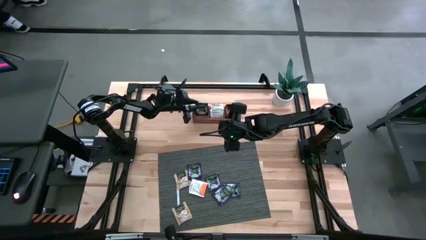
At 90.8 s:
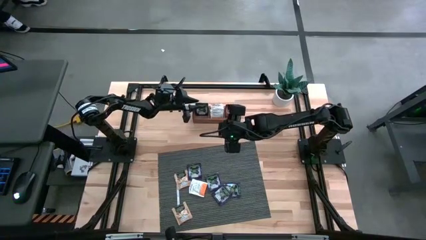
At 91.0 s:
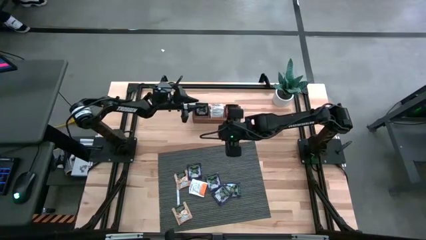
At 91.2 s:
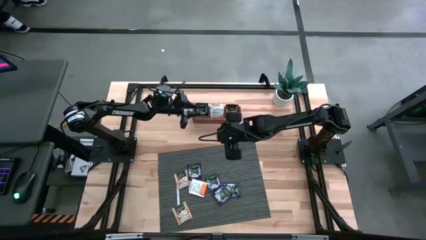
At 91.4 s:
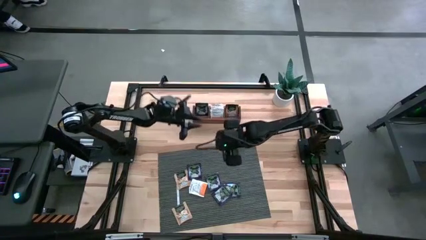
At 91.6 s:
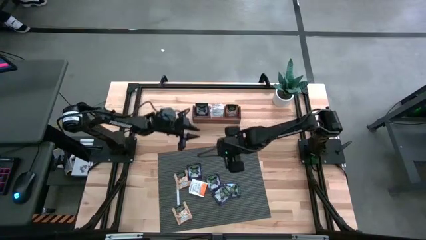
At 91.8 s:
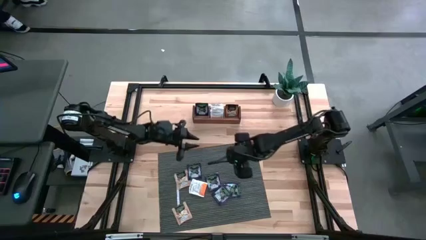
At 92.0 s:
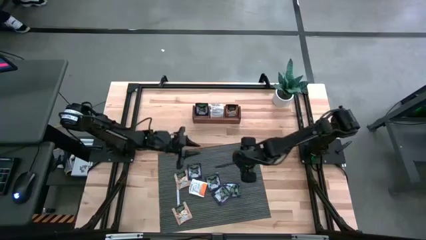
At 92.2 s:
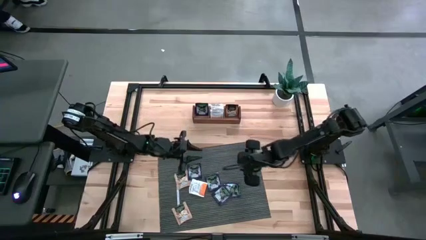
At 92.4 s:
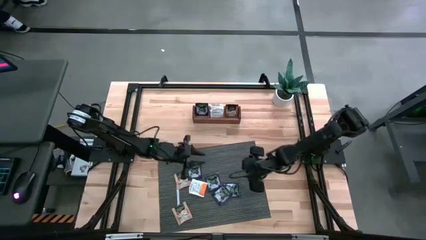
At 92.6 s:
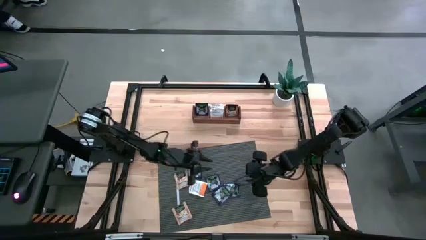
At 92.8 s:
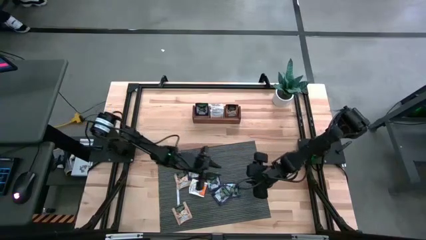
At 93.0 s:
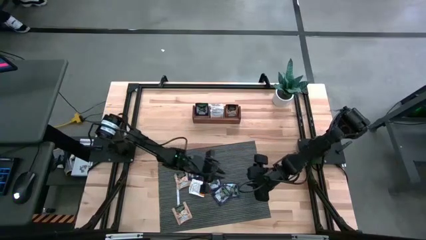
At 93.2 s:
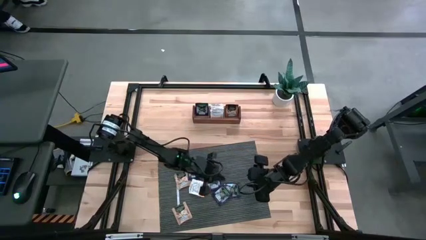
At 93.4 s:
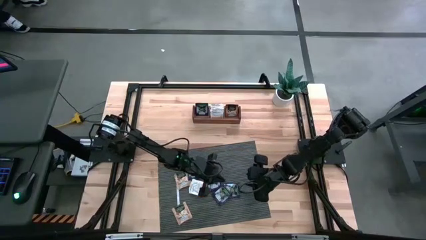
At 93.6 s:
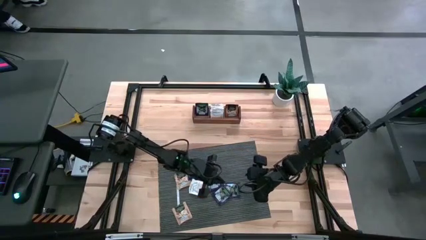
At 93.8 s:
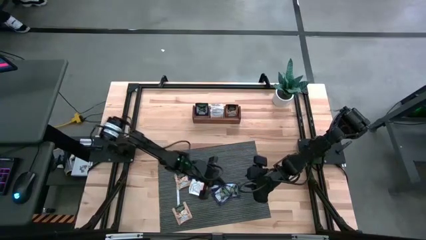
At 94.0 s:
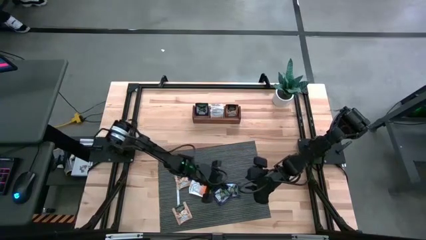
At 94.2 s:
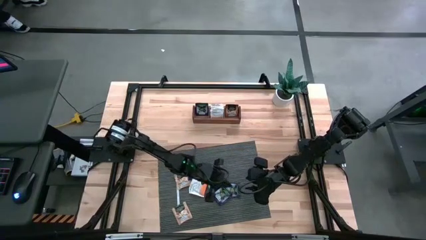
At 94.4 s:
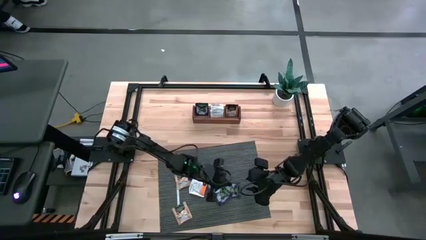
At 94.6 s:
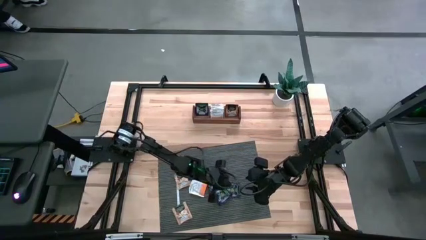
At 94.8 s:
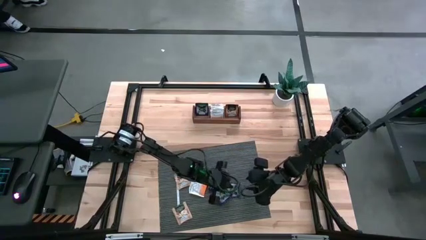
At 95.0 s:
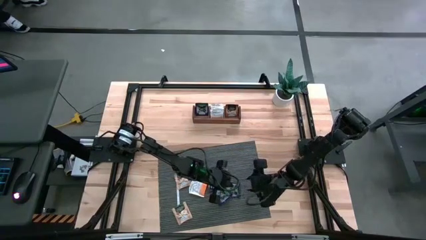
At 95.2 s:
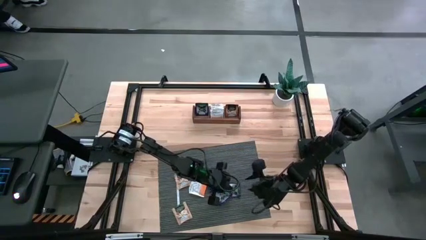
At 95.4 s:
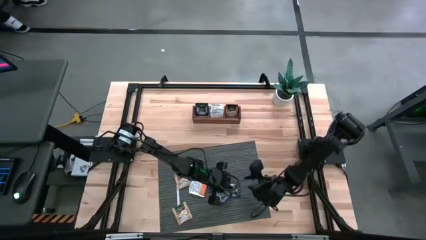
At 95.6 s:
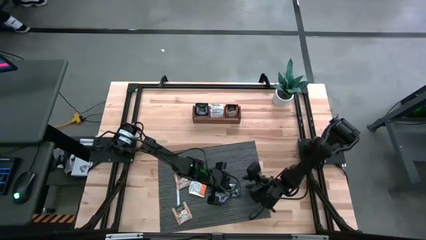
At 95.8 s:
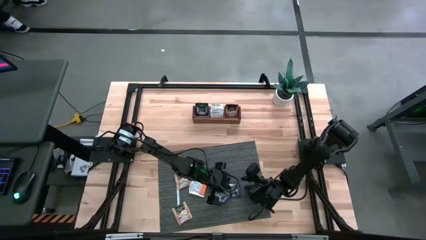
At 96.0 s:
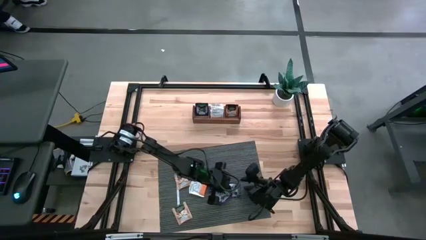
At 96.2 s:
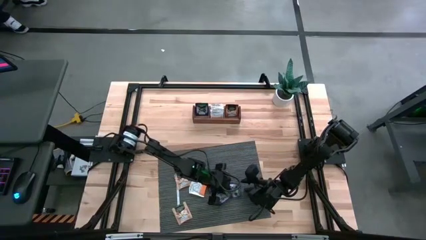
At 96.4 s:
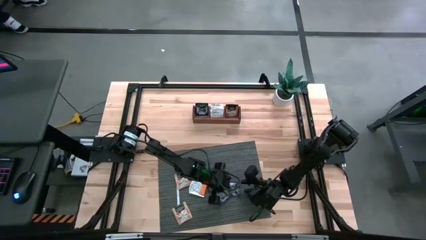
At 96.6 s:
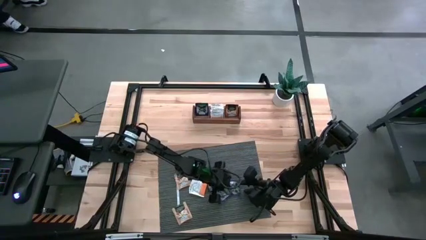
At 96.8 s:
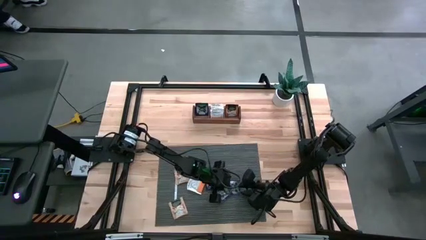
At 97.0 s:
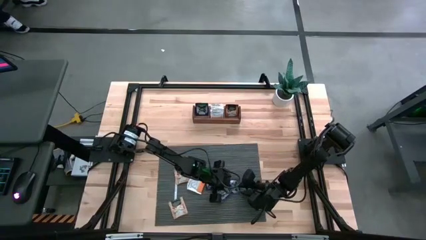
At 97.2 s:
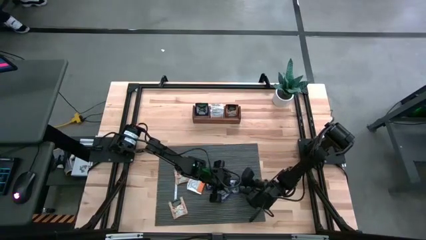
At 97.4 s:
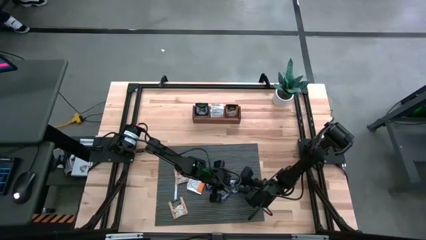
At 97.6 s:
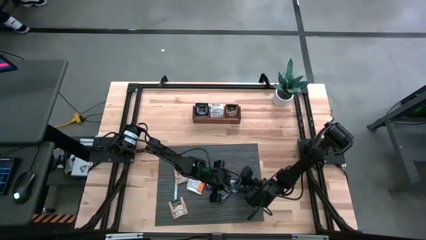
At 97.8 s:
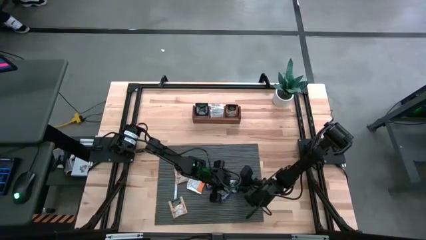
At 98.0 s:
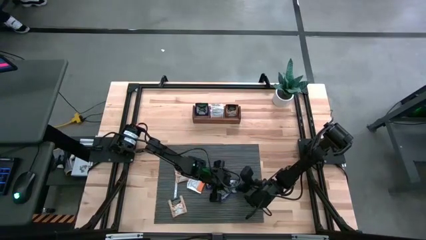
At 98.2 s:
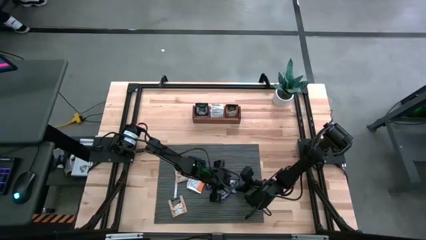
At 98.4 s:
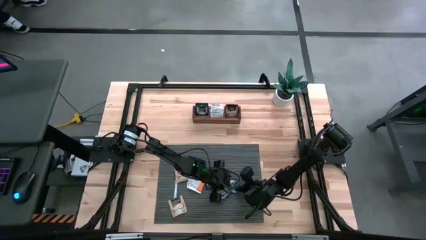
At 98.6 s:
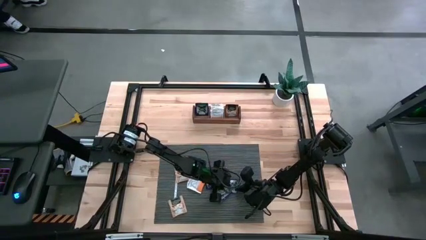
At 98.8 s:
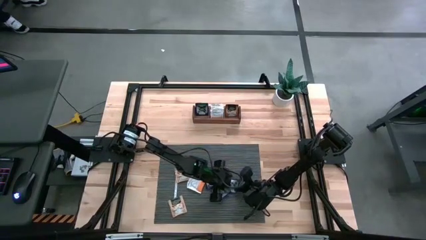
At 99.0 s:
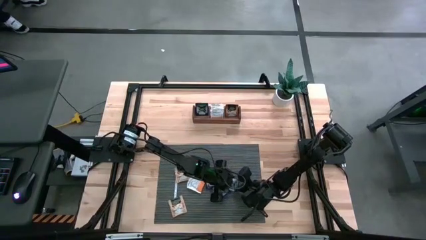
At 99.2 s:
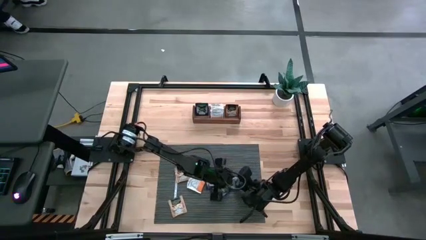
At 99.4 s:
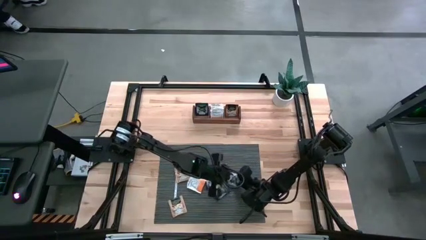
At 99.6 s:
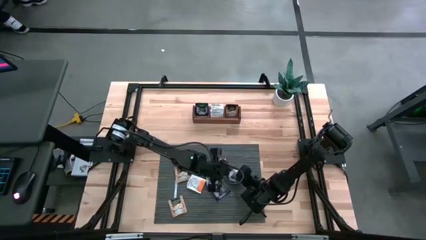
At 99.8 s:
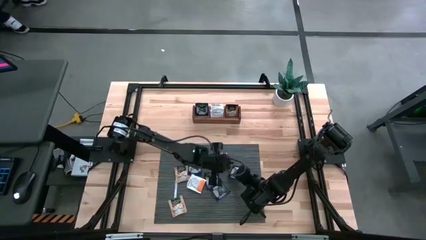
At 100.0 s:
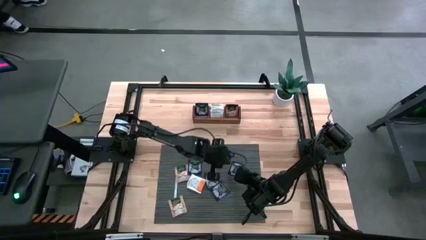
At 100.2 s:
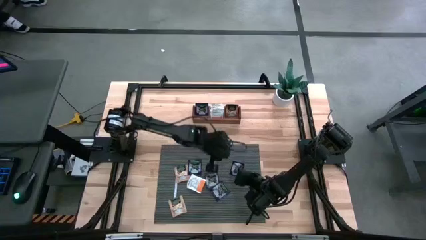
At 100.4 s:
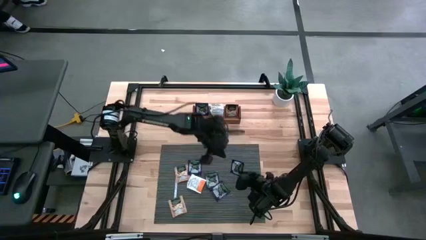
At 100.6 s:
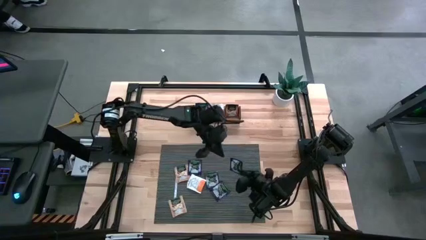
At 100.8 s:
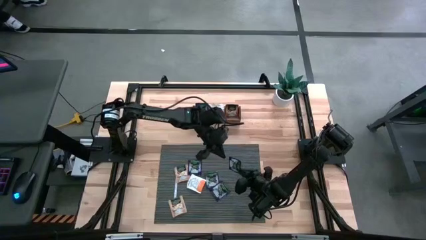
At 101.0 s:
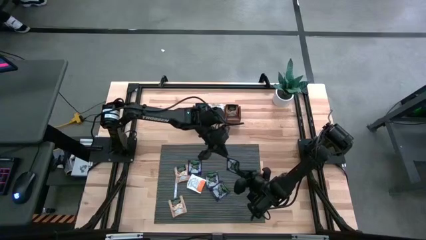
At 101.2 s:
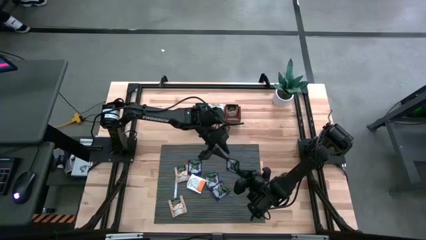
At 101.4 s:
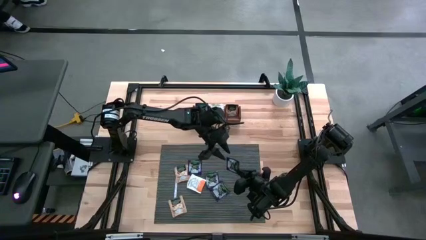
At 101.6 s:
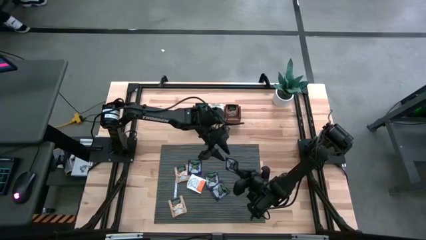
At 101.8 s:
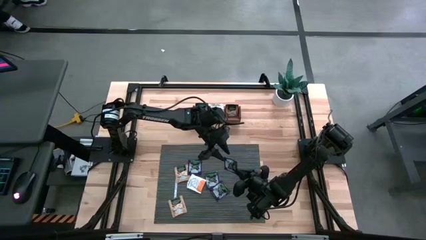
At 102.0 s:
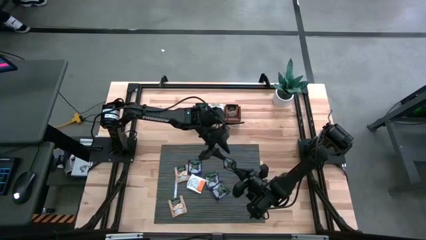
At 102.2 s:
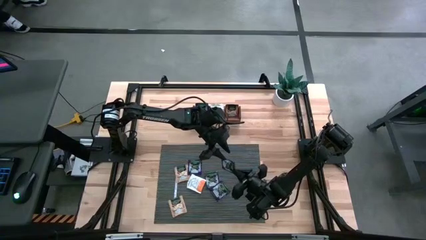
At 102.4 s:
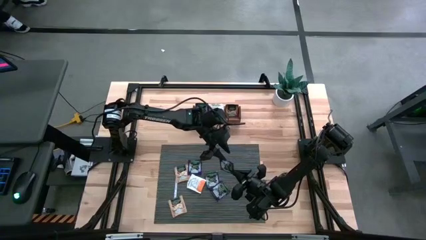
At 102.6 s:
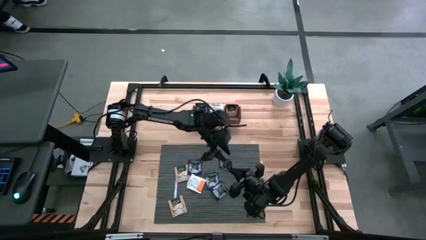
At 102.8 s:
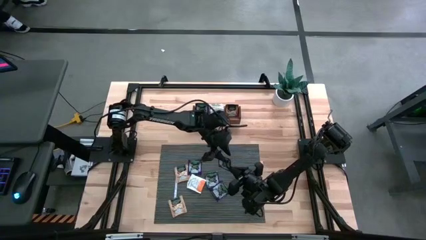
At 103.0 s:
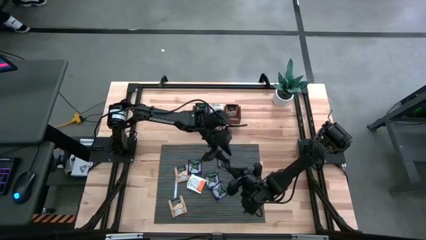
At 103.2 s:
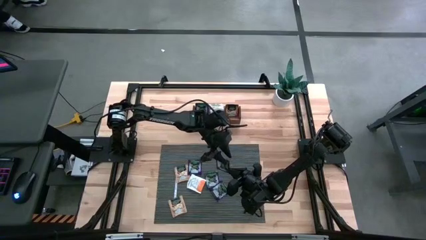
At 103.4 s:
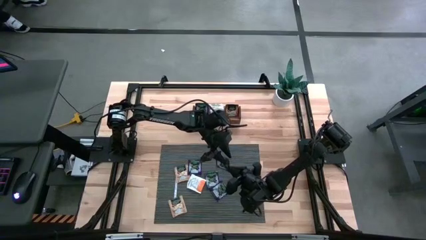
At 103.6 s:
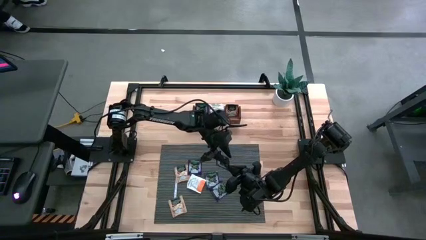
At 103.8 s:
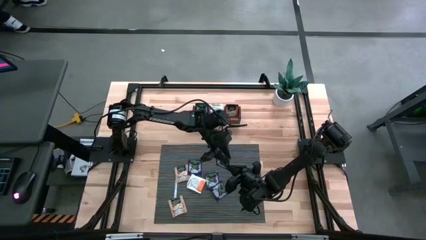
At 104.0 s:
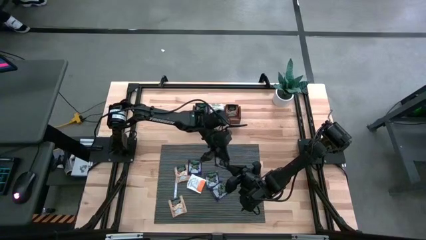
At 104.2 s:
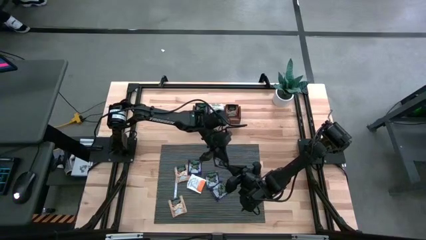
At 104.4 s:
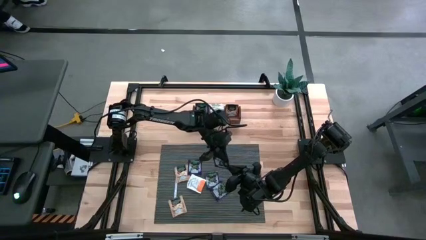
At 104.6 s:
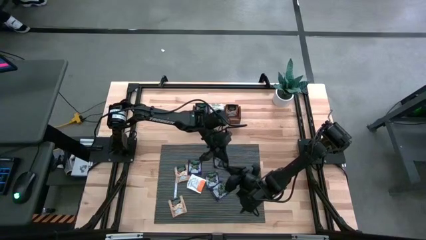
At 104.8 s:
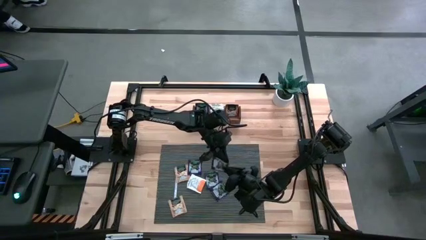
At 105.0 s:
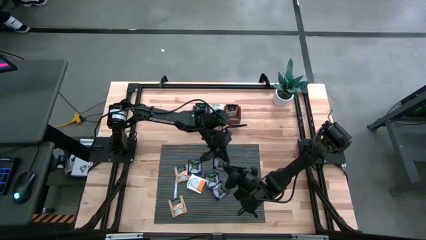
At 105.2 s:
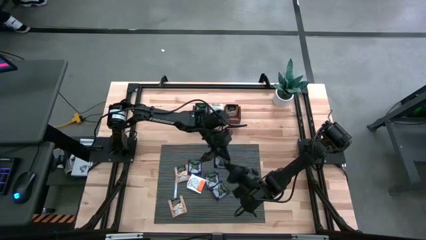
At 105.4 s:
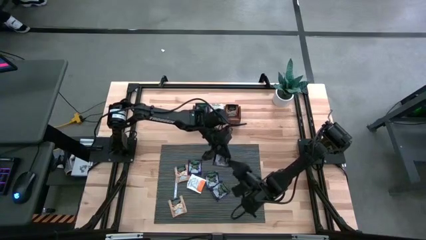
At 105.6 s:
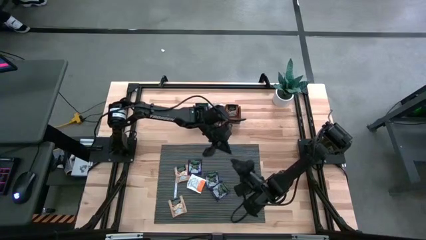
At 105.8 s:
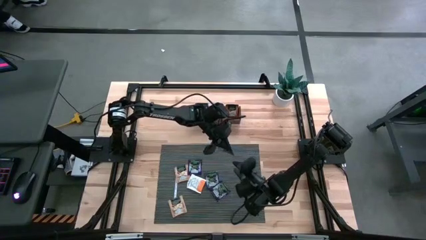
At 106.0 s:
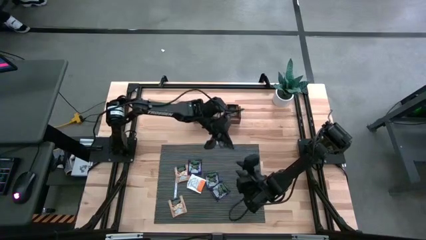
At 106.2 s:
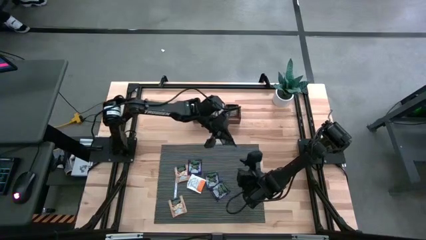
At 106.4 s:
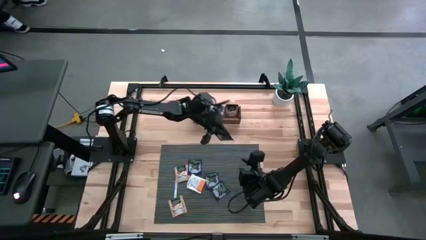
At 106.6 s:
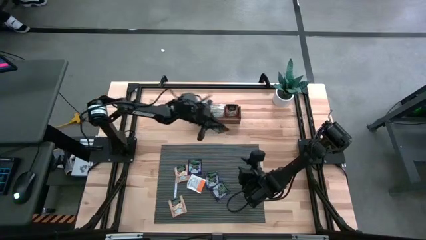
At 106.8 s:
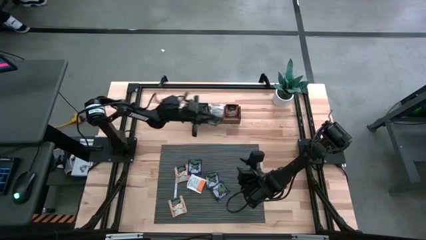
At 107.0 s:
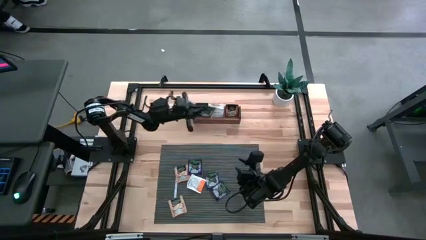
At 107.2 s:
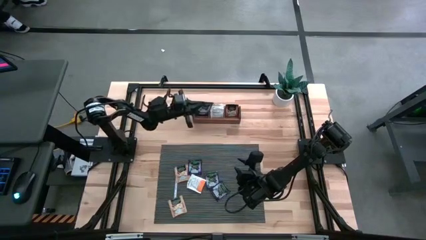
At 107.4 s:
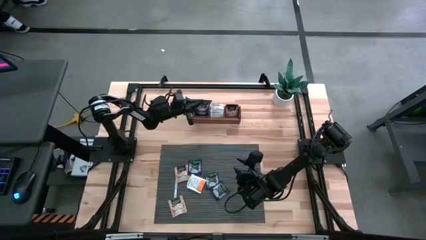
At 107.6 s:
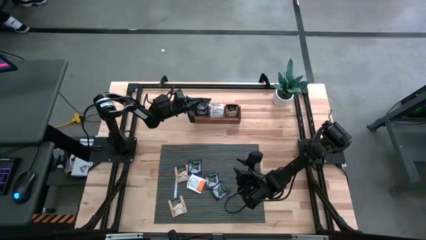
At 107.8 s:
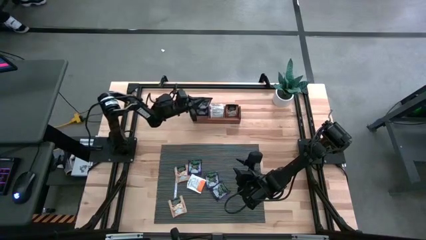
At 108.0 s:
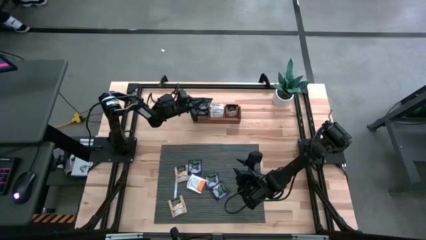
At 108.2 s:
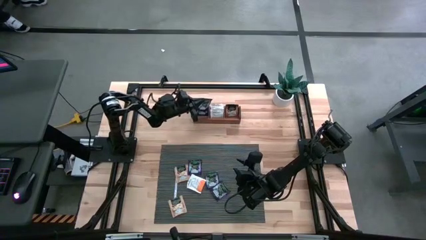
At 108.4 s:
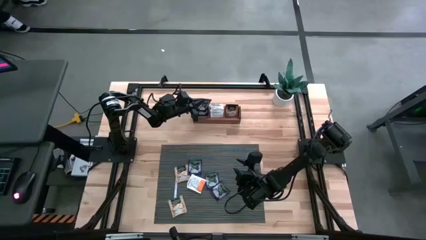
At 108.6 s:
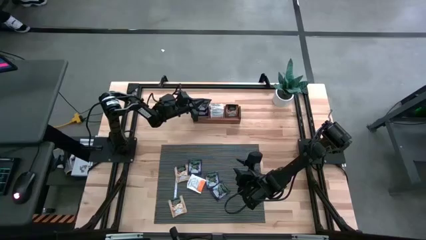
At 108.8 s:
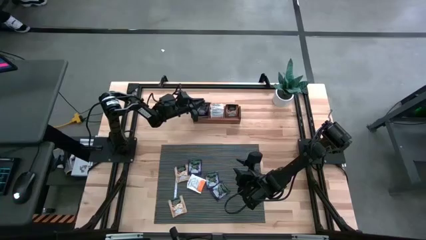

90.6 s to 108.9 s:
Task: Pick & Place Tea
Put the purple tea bag into the left compartment of the wooden organizer
